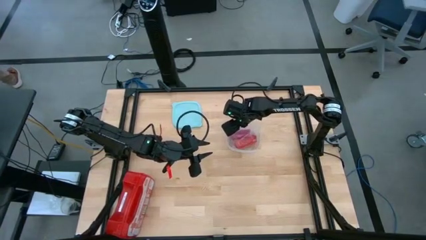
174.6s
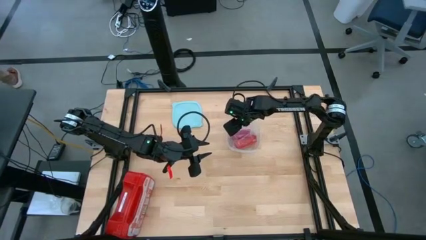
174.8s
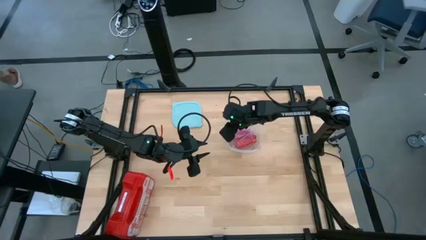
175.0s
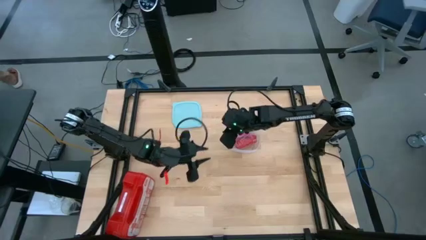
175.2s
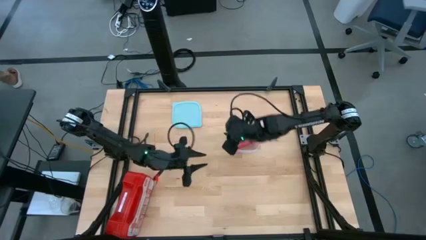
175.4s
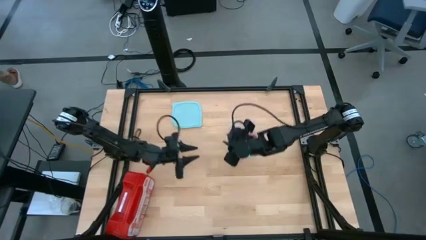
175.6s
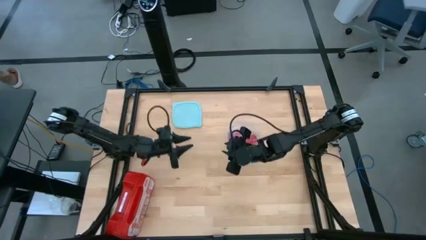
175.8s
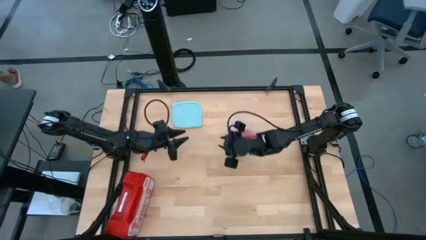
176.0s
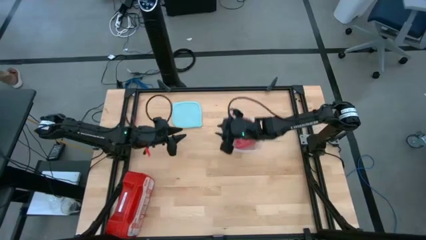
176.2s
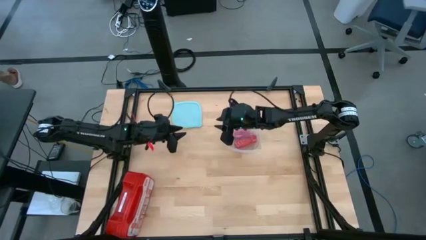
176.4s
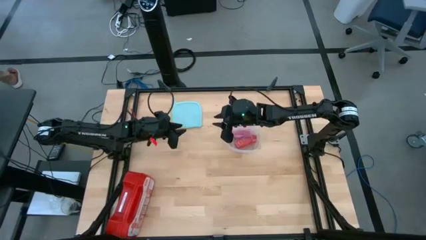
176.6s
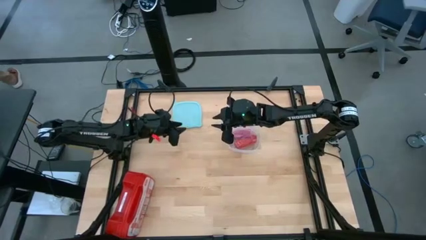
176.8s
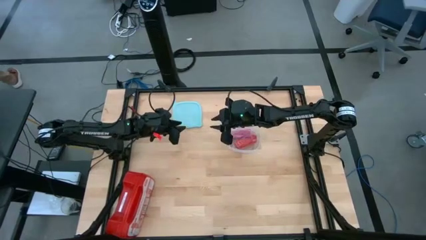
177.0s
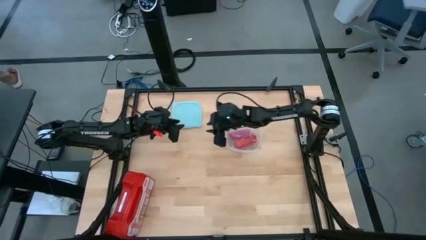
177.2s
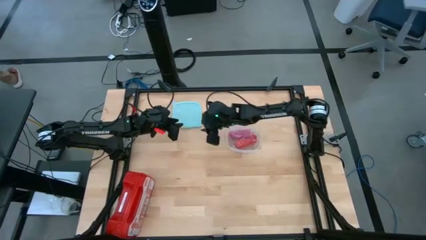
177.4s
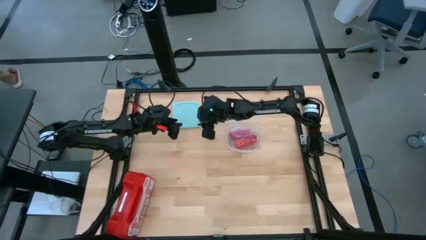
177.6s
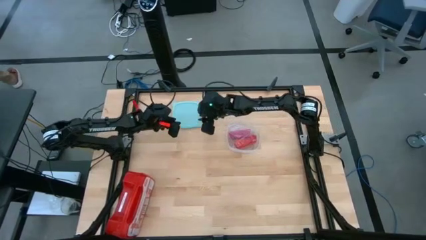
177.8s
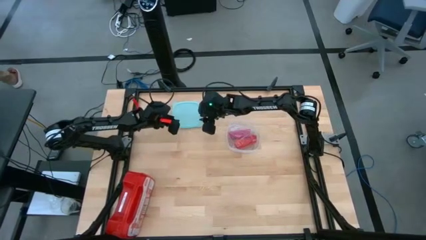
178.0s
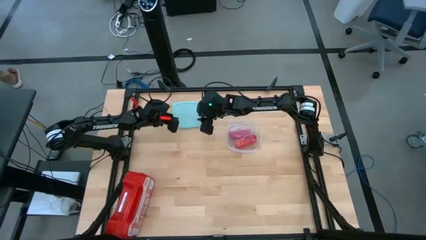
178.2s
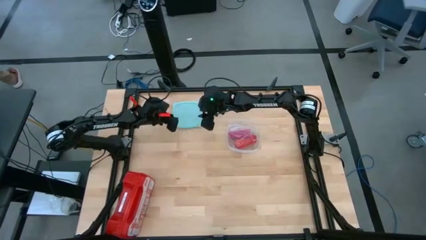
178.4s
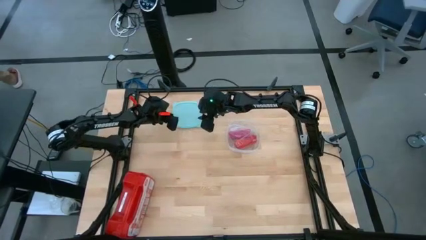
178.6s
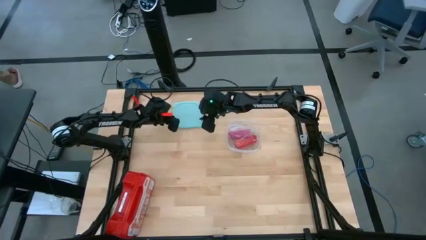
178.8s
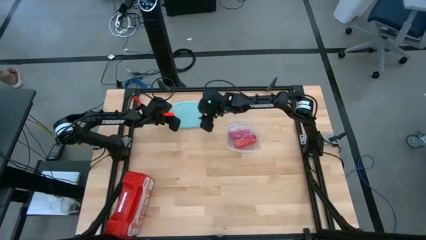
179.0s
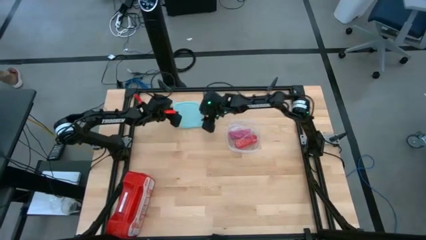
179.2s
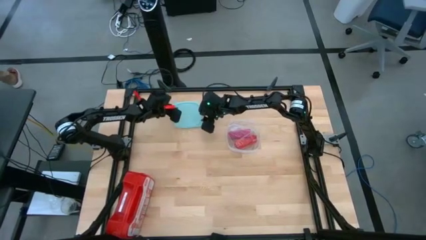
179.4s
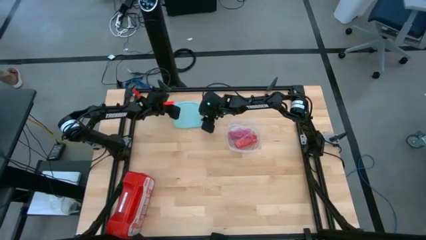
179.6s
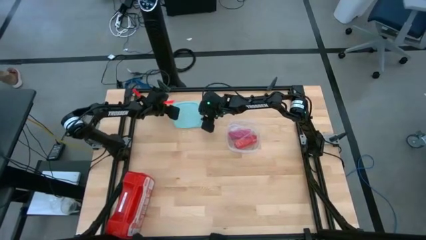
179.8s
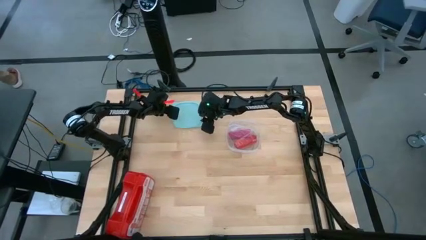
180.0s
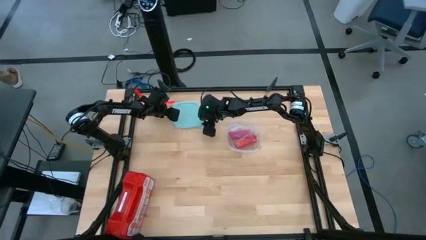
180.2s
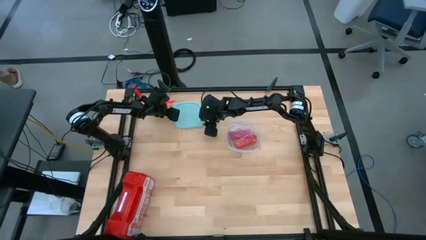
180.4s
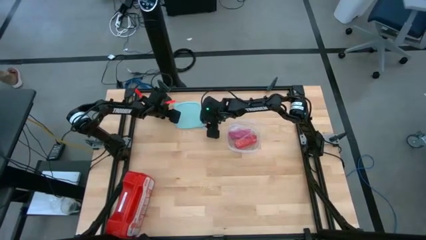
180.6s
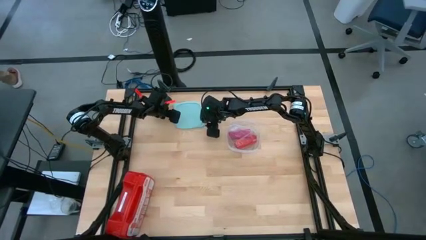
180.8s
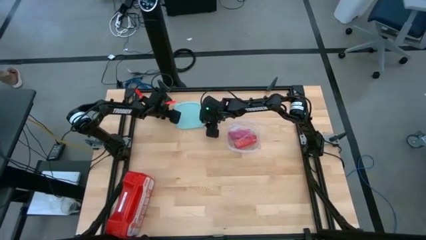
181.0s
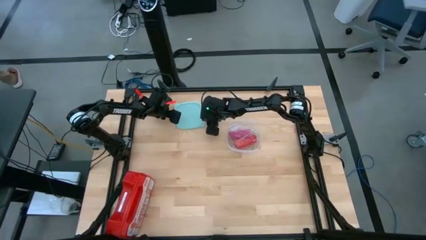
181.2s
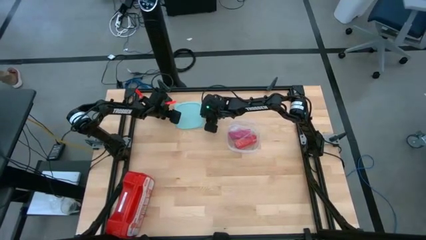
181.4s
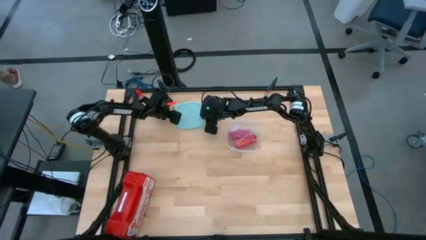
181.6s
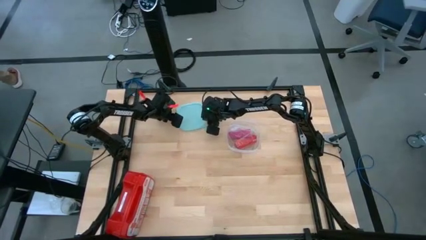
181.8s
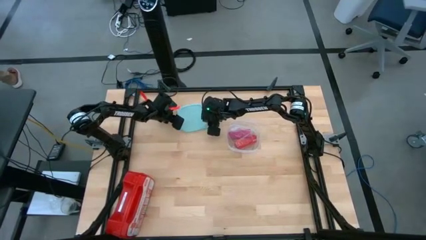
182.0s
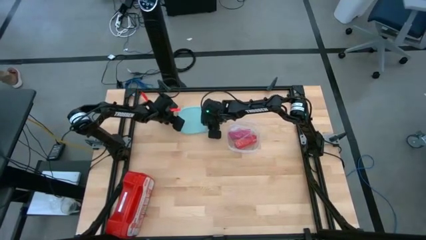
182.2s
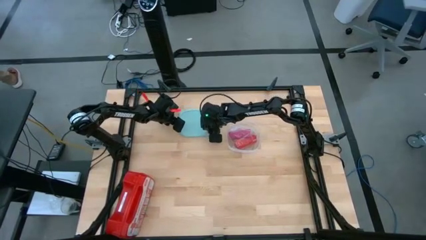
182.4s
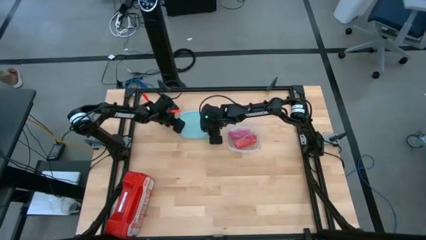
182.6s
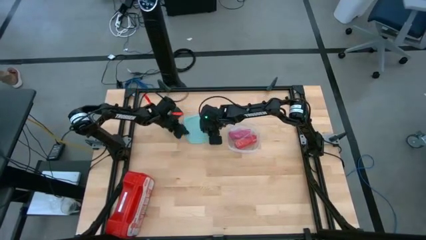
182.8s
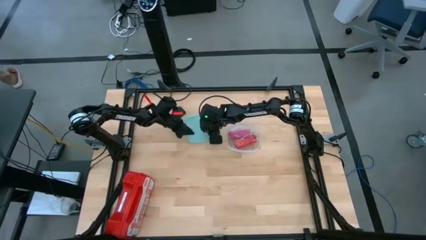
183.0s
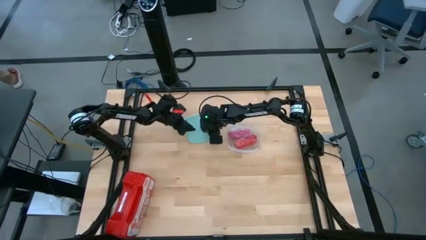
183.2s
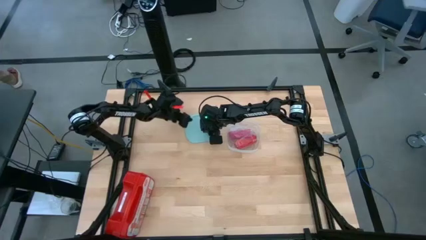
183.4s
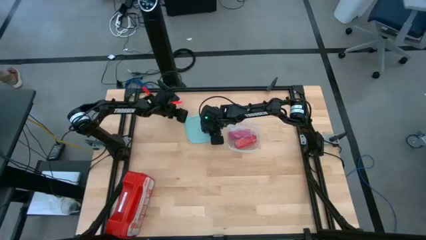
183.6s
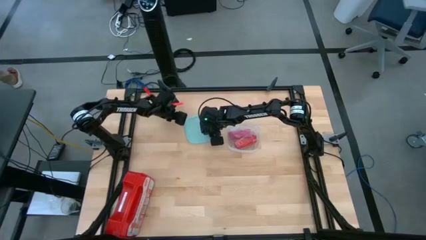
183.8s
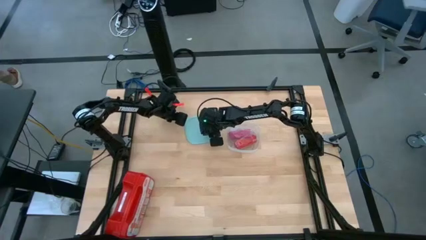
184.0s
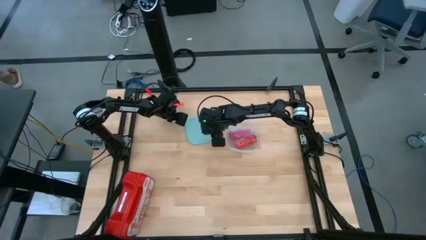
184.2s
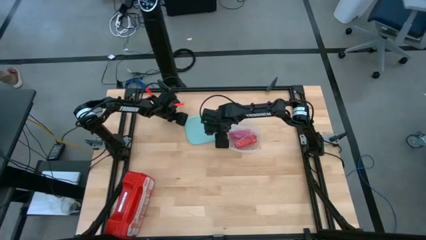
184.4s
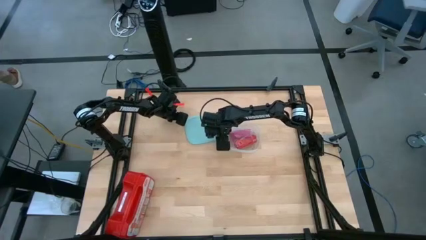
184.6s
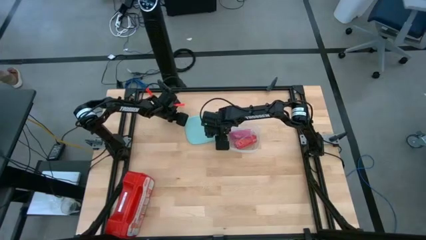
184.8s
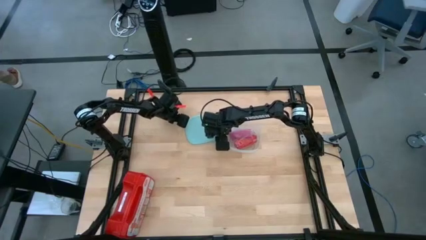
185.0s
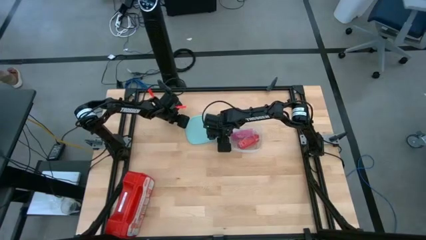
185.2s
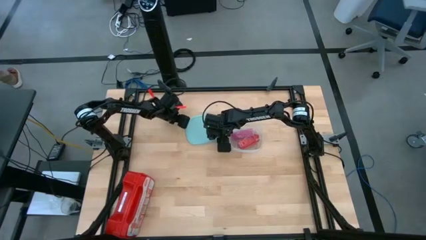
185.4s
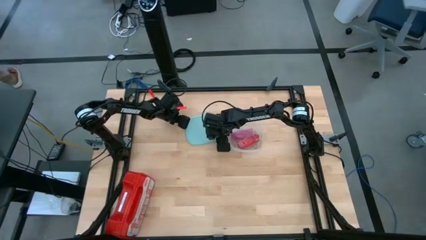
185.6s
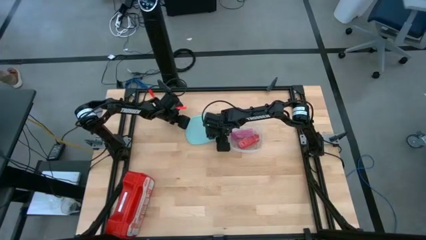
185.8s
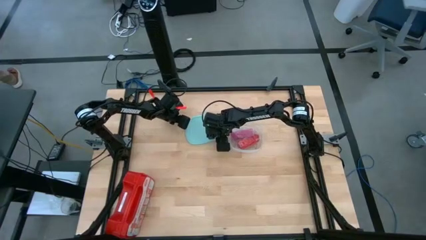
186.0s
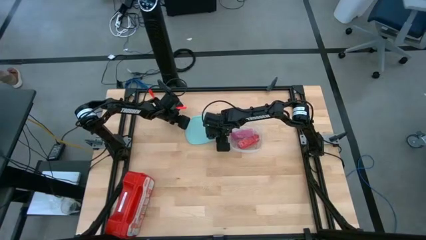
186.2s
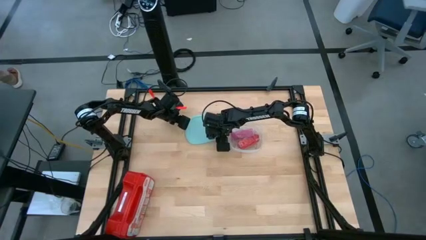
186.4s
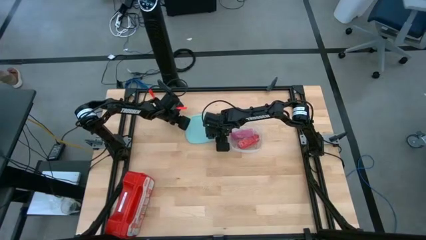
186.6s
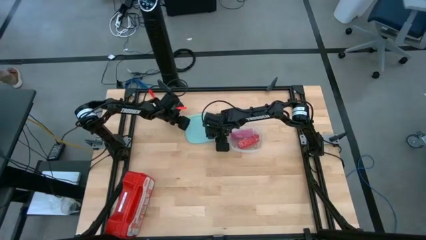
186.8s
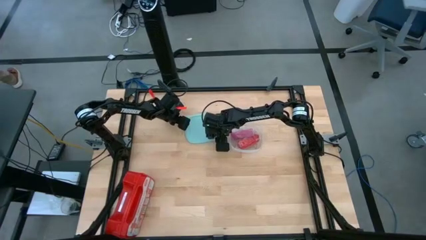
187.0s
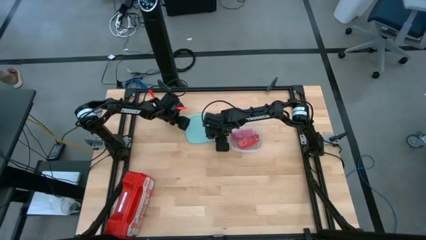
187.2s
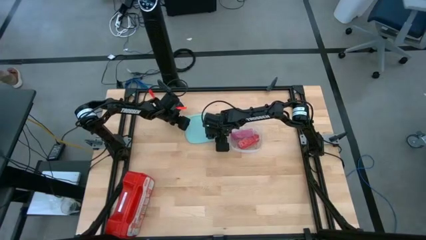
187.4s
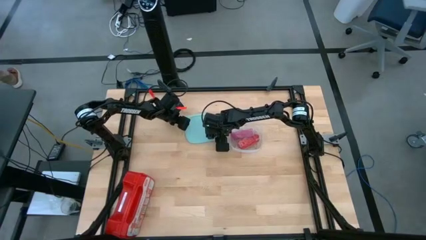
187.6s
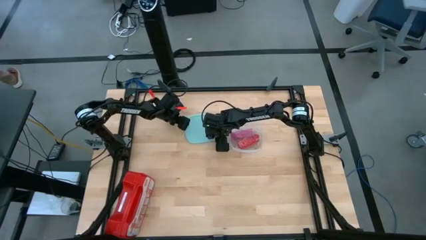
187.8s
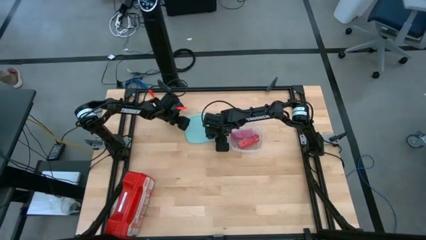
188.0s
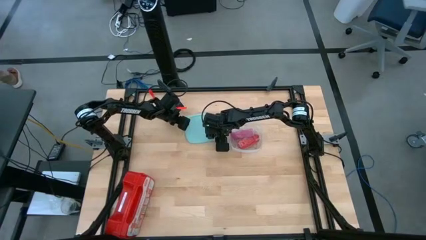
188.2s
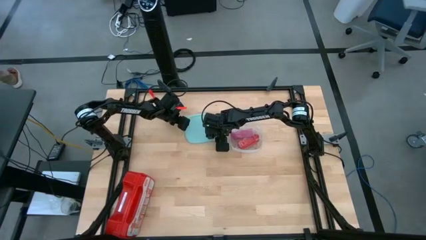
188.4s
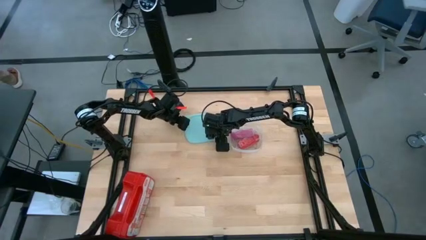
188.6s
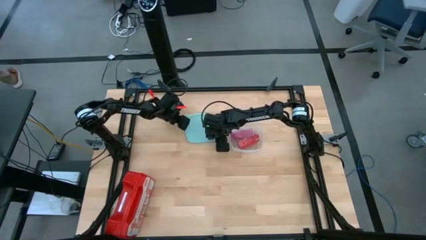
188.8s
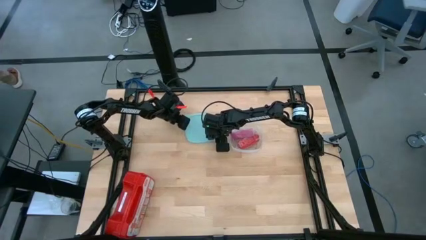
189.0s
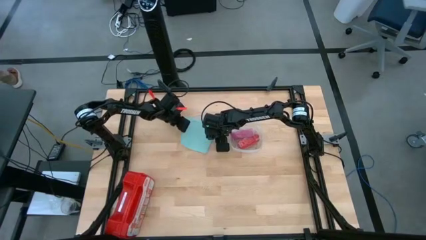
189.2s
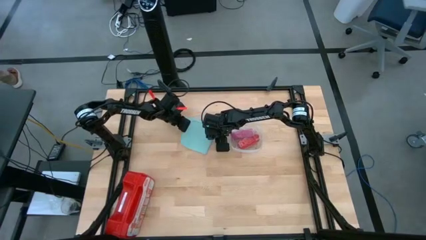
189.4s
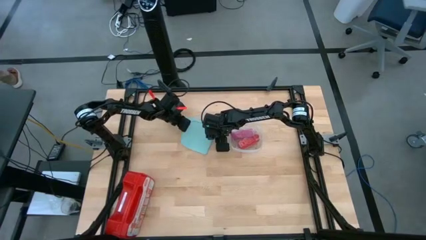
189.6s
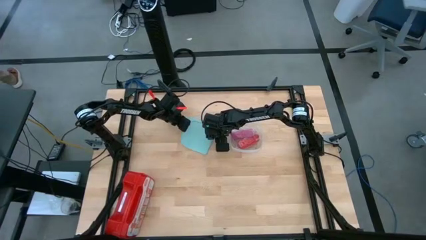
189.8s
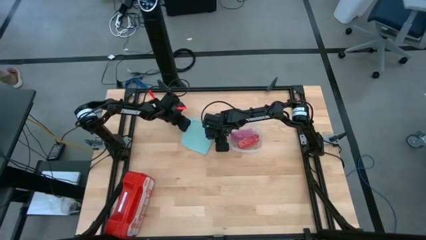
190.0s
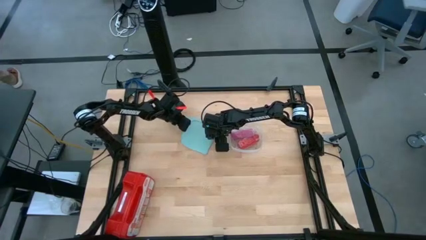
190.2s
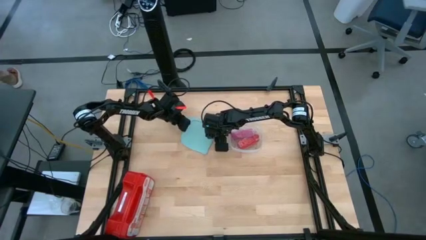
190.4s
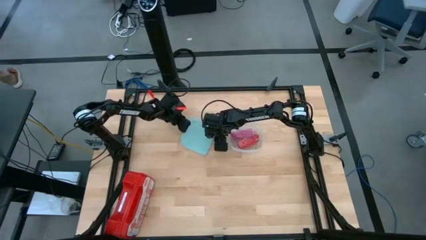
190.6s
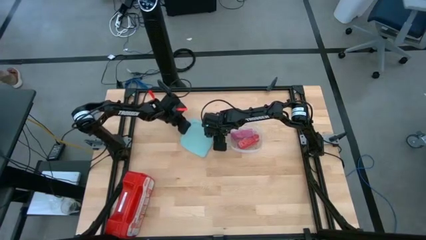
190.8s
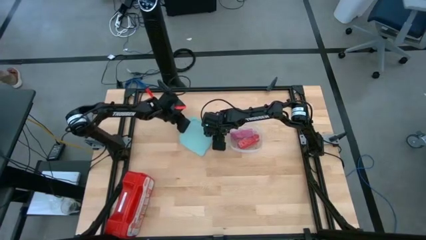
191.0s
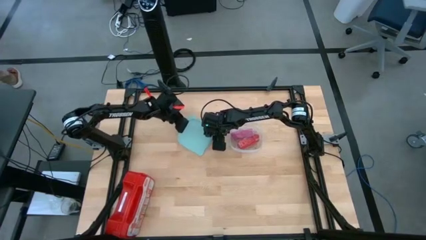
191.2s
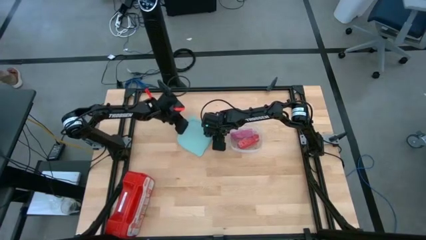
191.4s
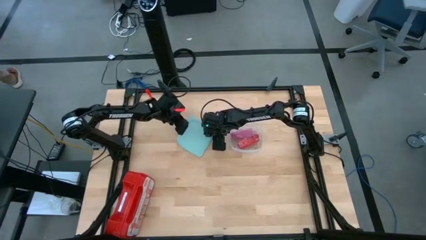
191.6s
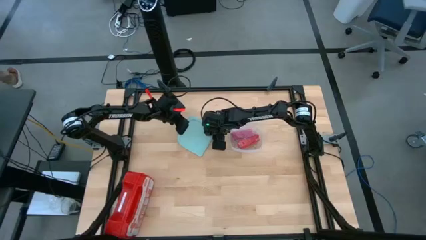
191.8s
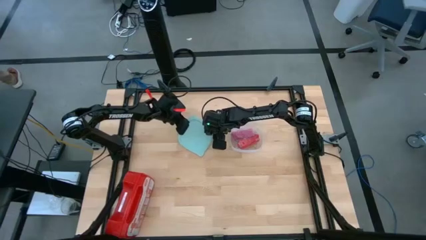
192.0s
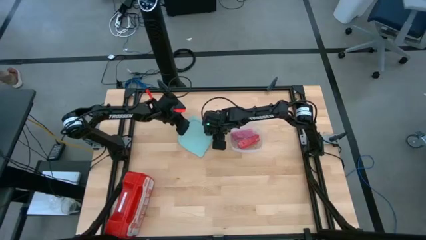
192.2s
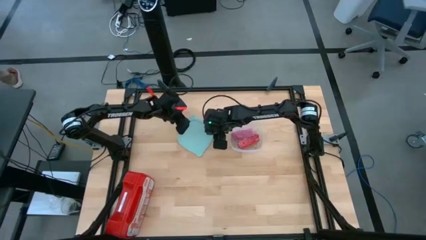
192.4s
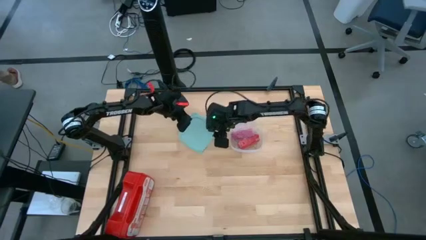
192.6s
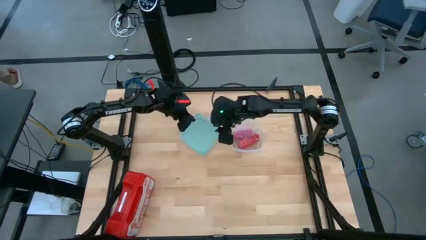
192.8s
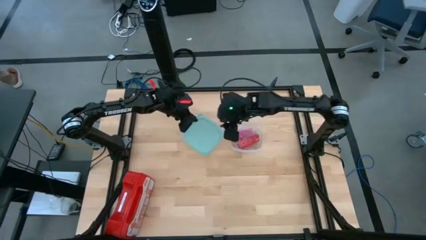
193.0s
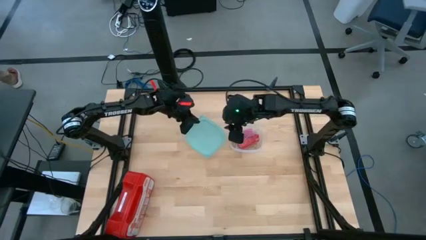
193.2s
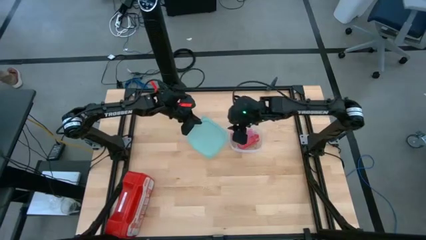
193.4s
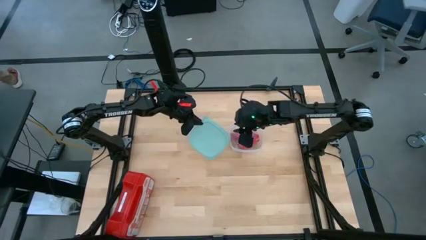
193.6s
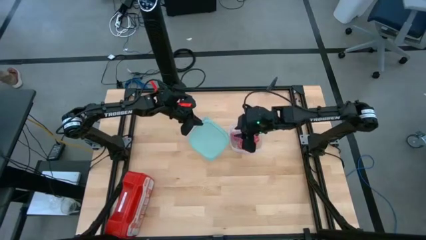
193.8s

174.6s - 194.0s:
Task: Roll bandage
Close the green tupperware
